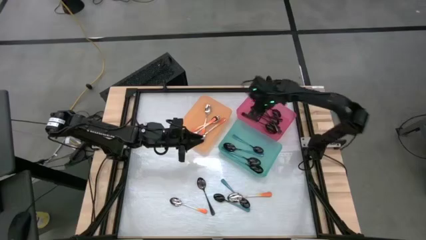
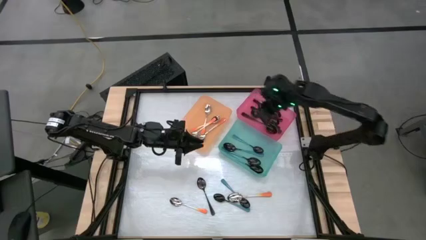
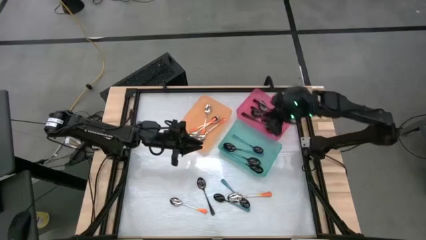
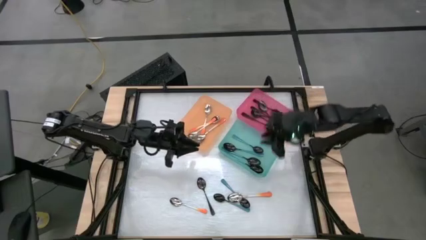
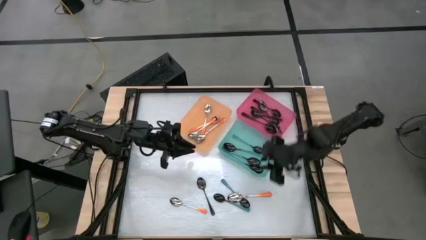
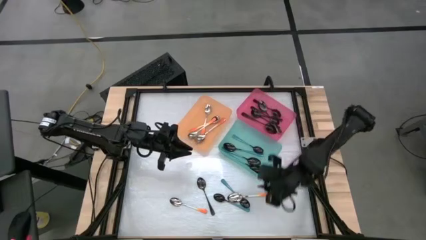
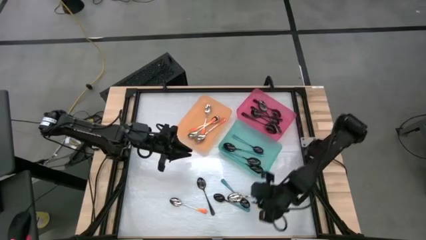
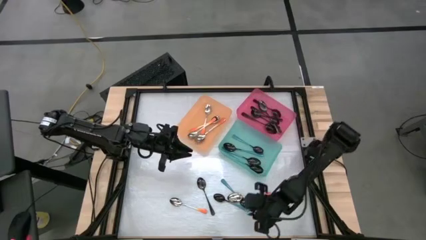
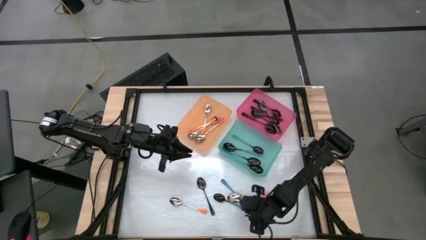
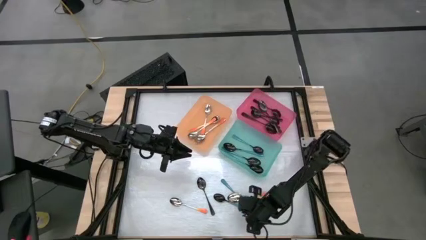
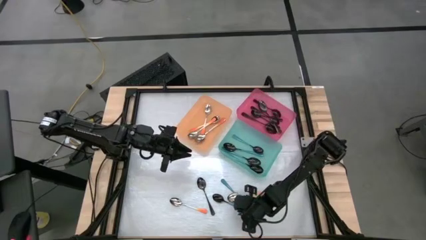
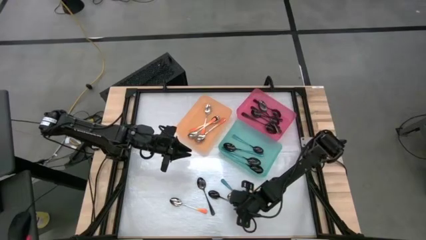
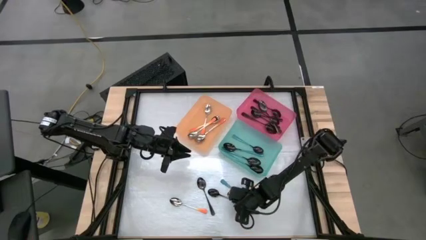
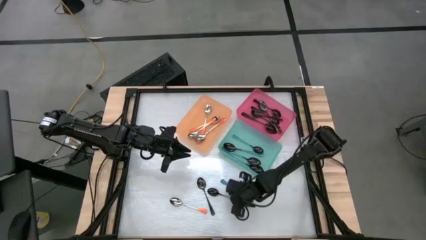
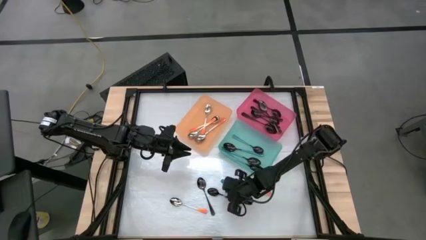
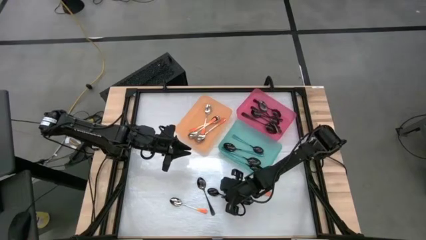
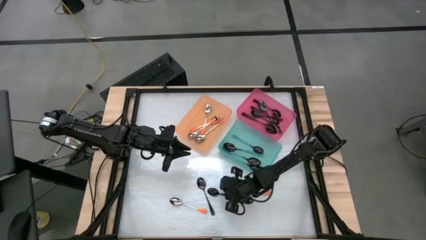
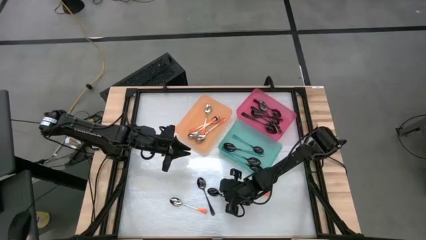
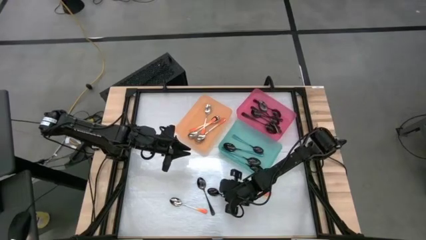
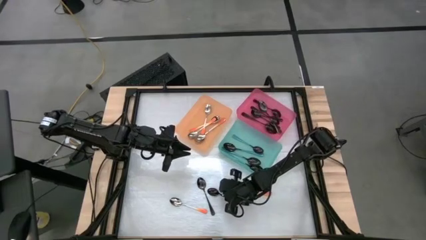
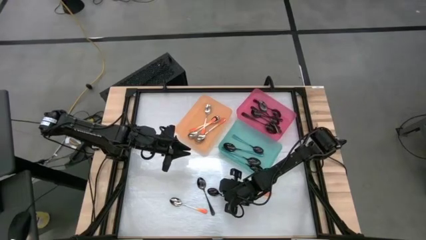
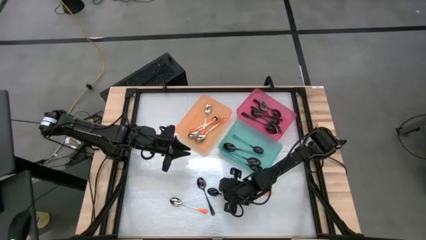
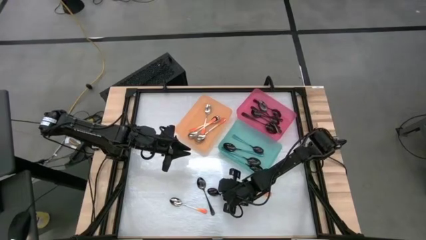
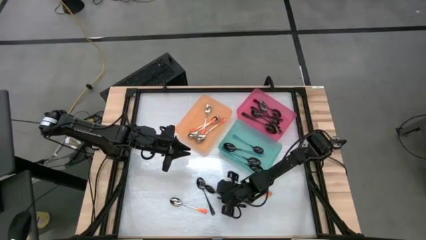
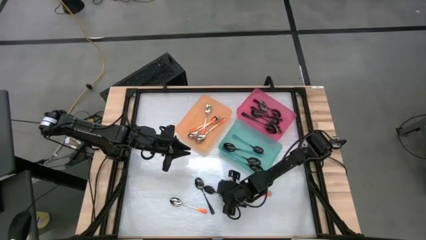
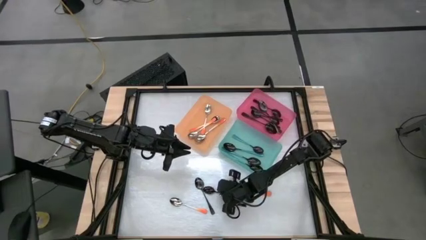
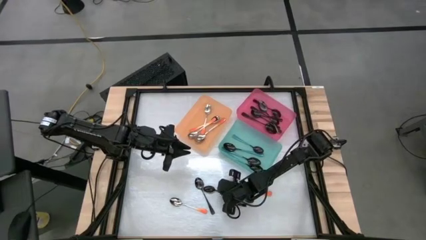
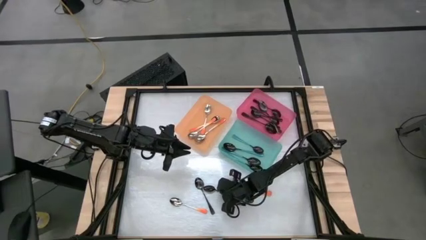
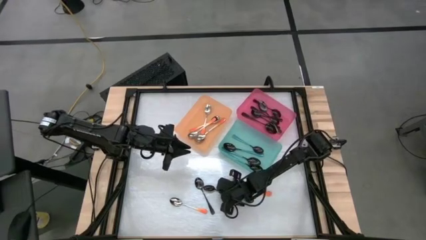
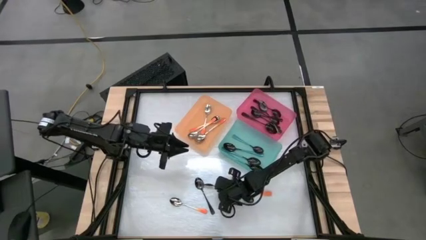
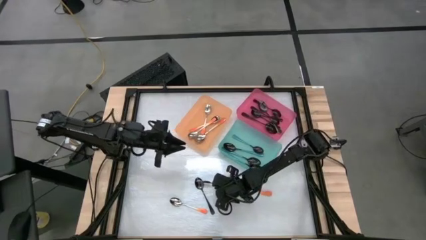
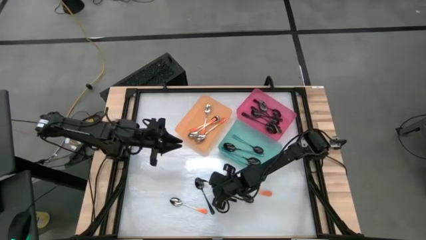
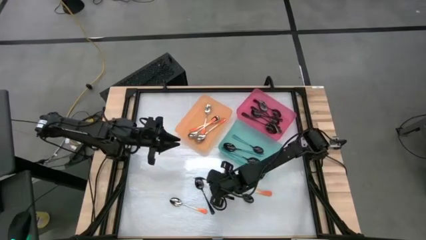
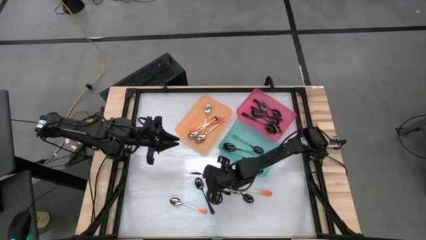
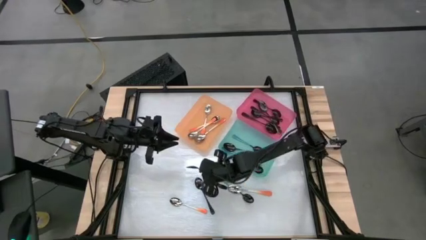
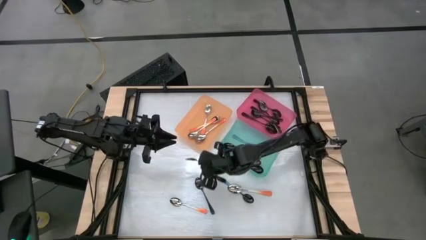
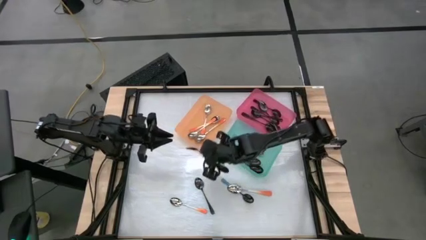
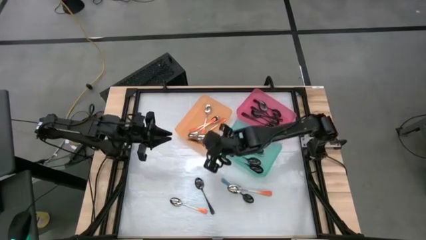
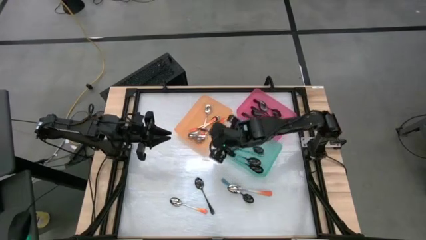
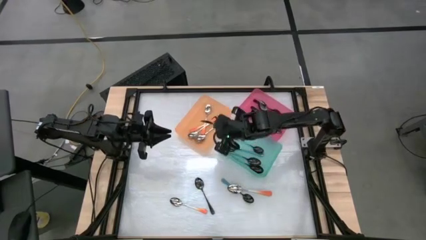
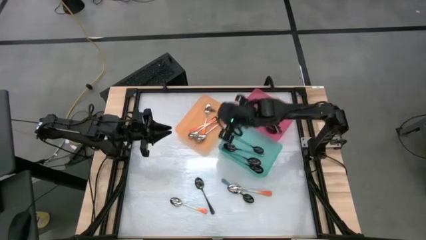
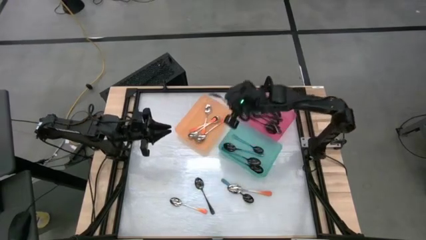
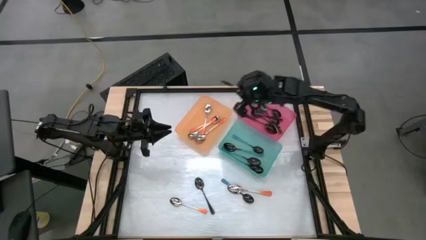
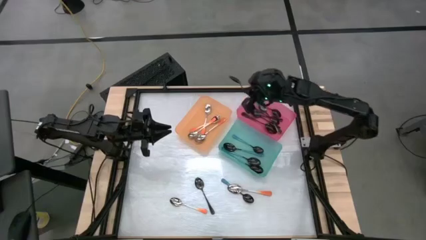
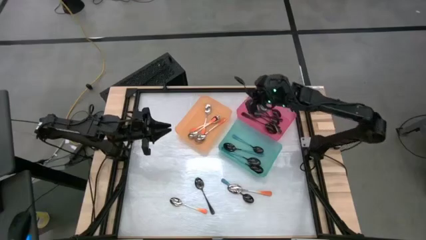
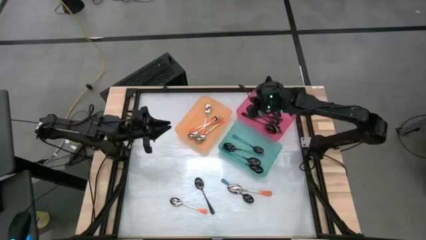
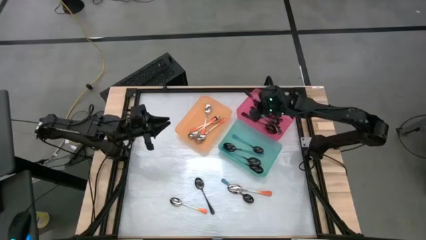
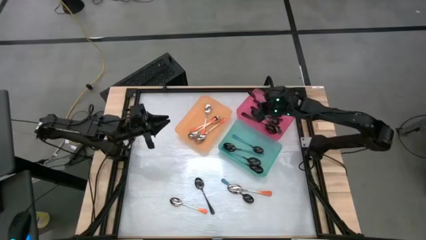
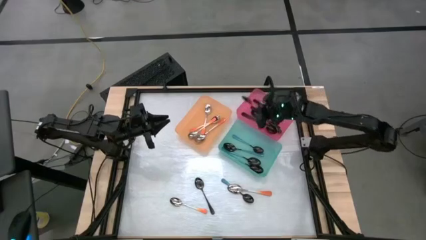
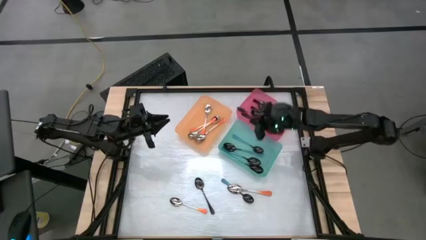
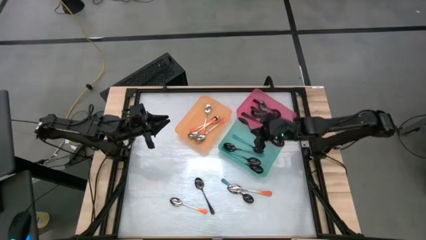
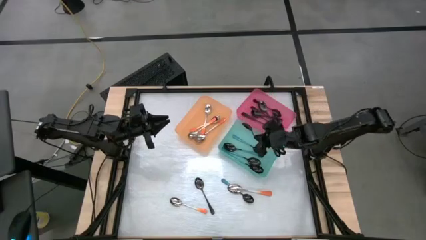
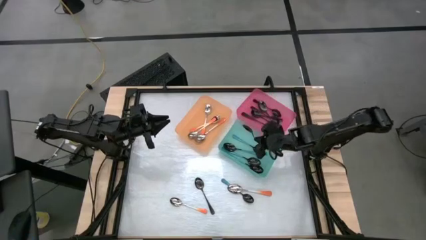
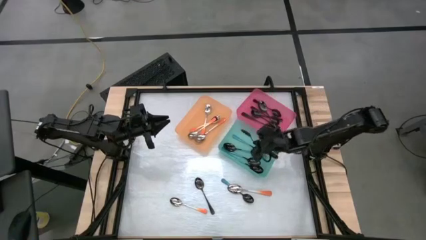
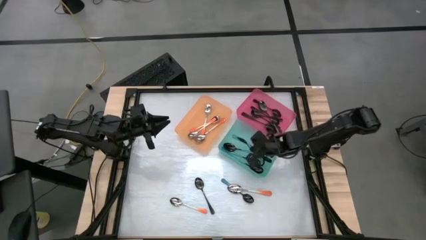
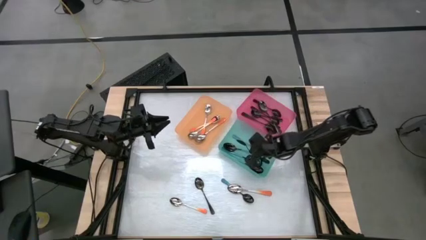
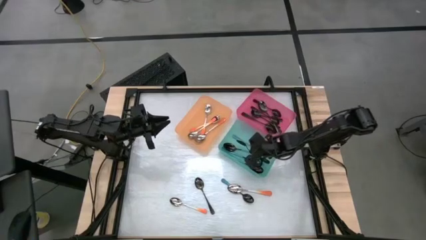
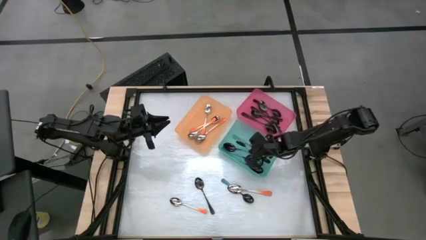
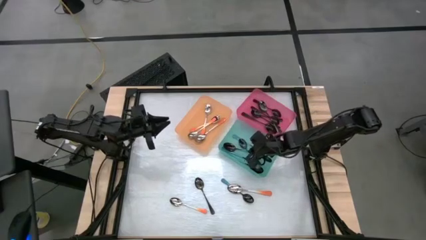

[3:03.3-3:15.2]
Task: Sort silverware by color (type)
Put the blue spoon into the blue bin
